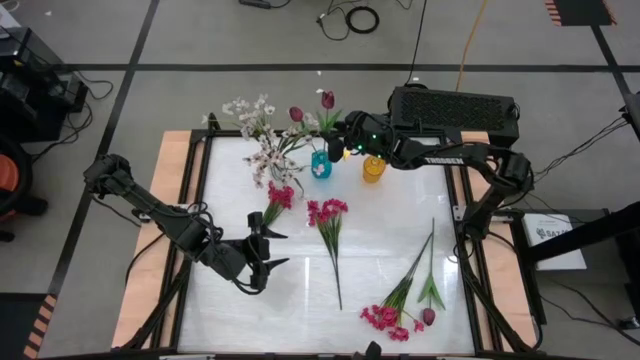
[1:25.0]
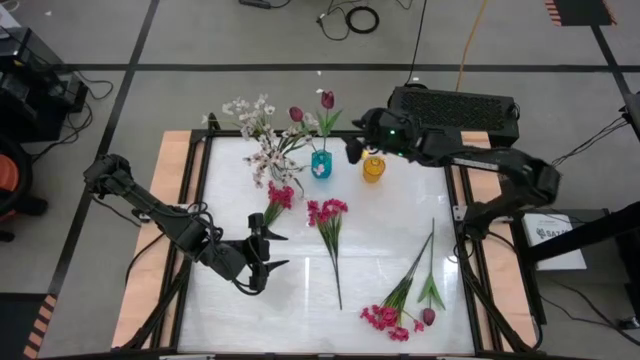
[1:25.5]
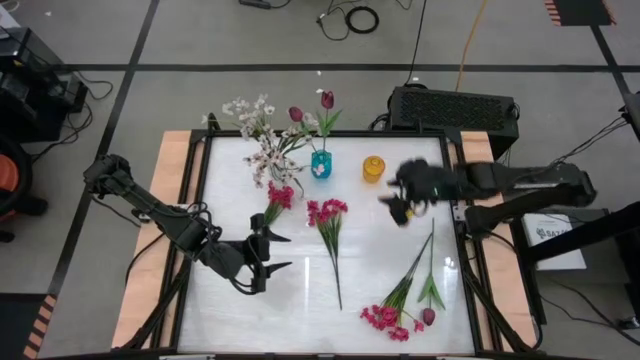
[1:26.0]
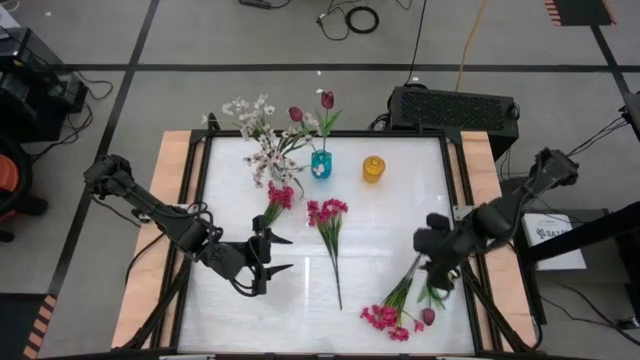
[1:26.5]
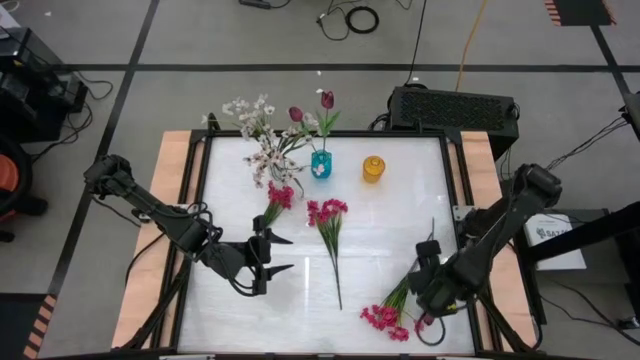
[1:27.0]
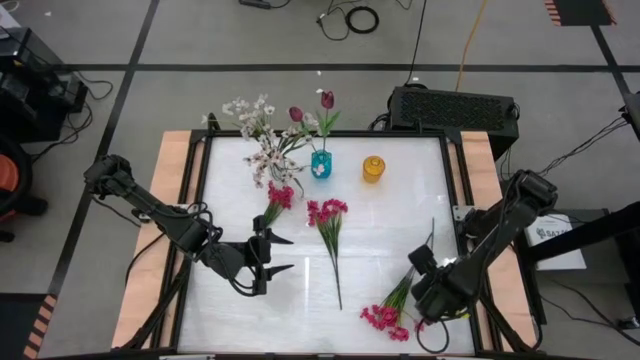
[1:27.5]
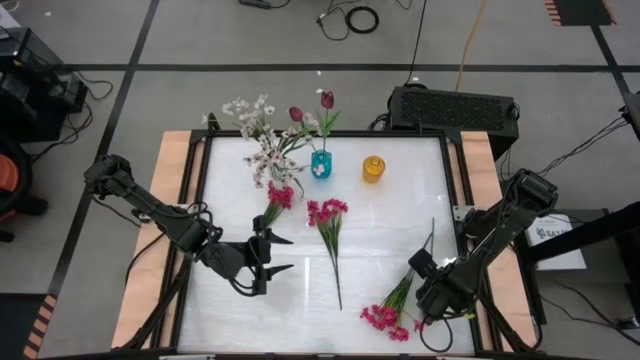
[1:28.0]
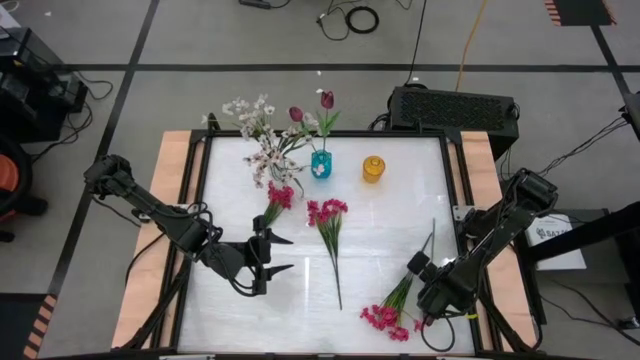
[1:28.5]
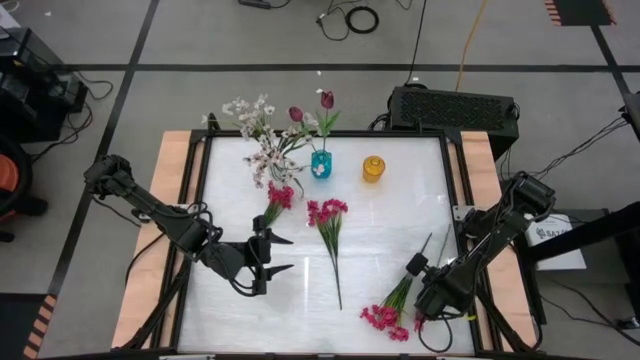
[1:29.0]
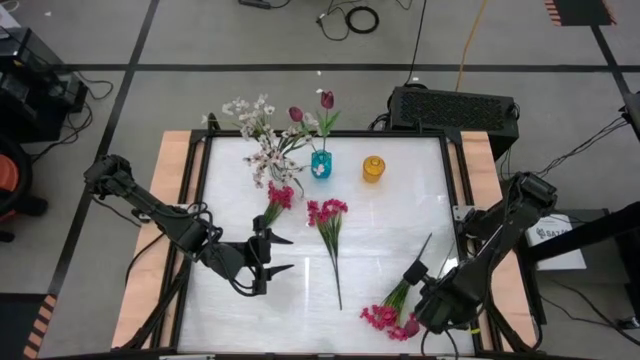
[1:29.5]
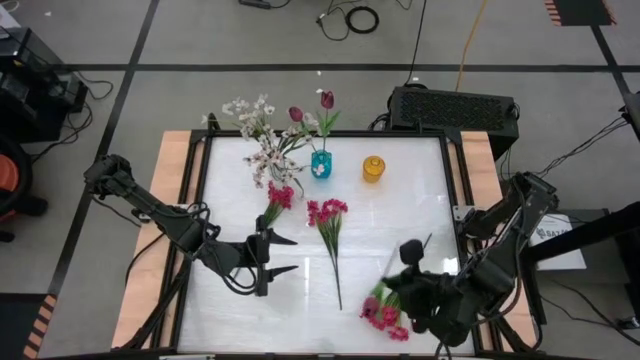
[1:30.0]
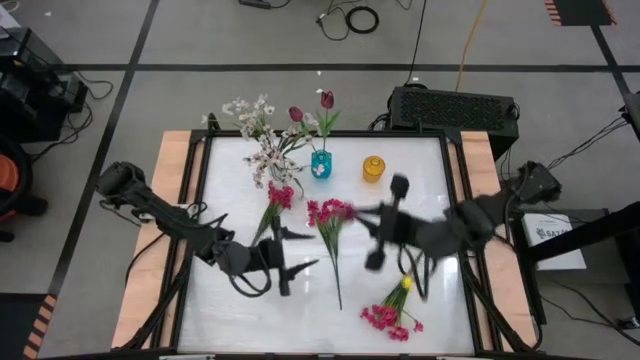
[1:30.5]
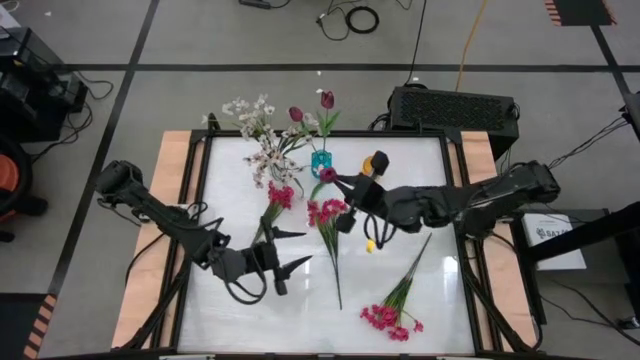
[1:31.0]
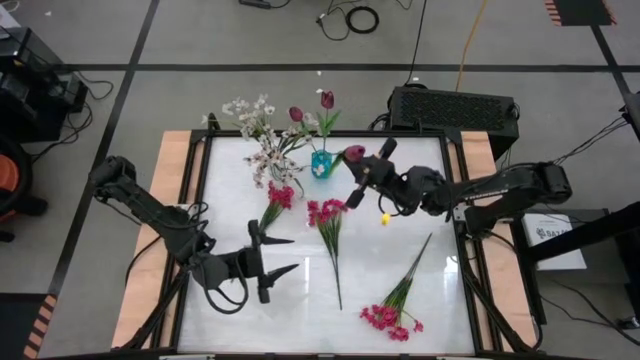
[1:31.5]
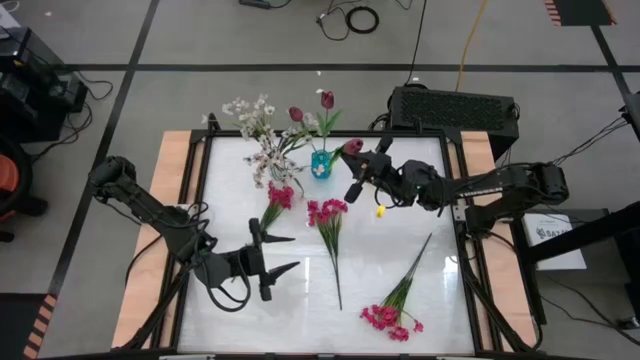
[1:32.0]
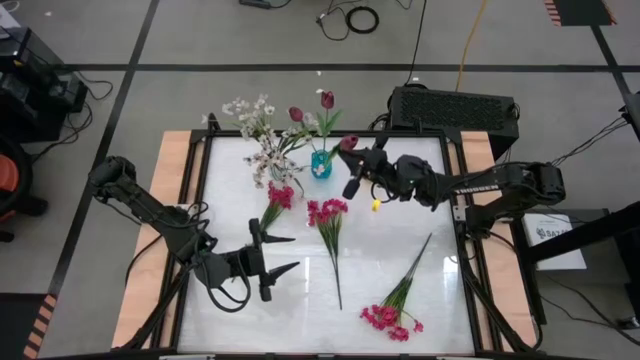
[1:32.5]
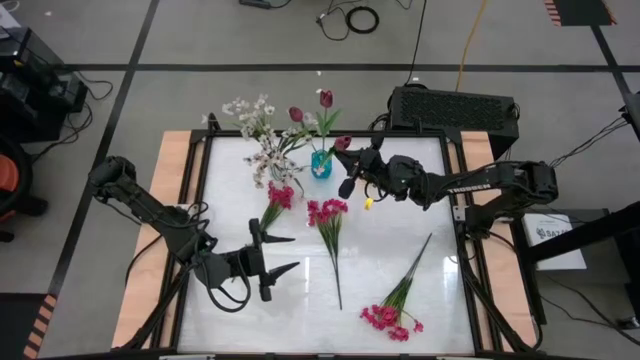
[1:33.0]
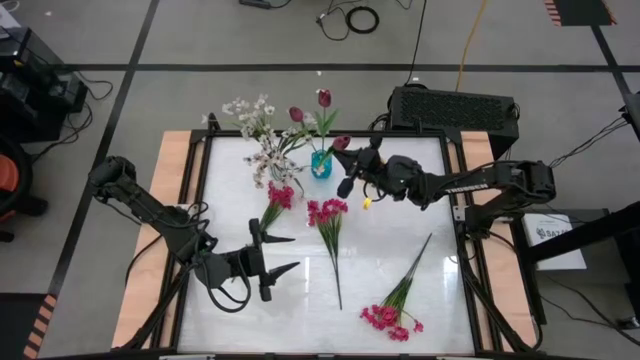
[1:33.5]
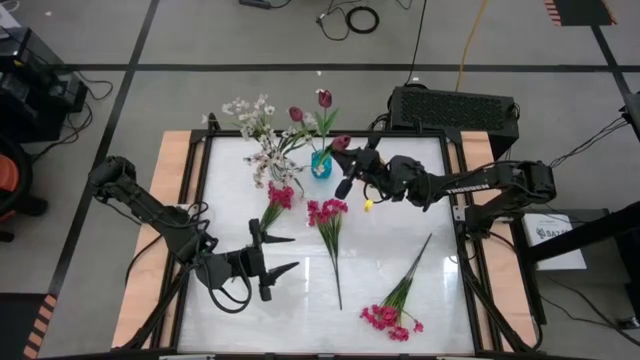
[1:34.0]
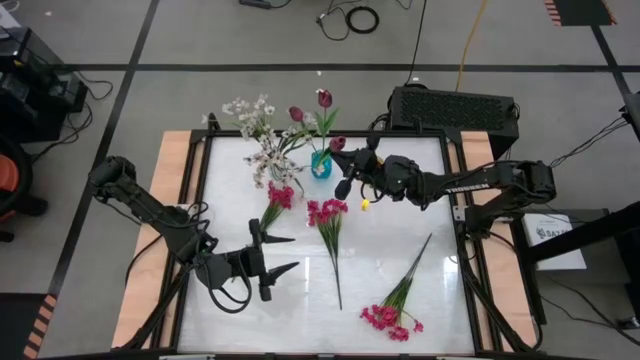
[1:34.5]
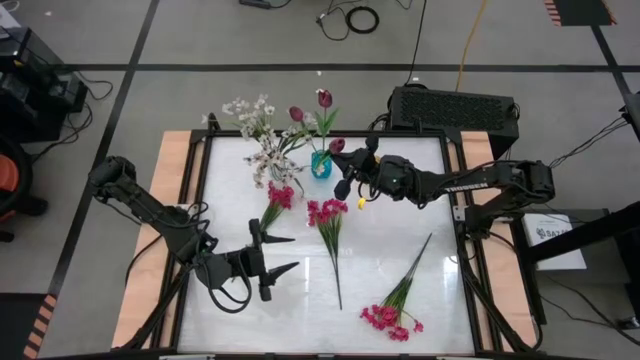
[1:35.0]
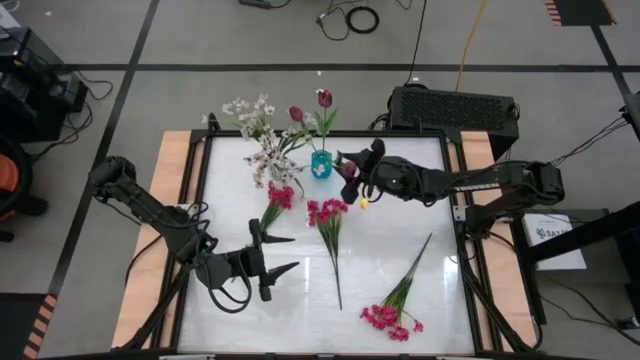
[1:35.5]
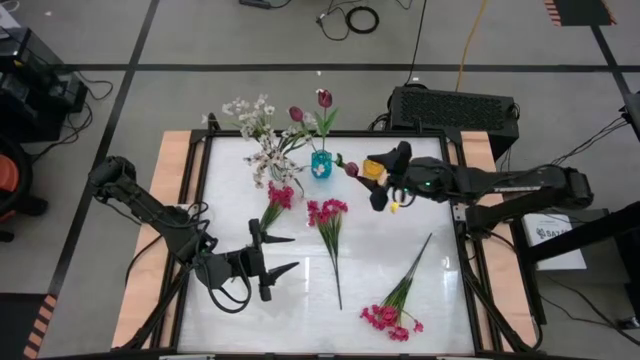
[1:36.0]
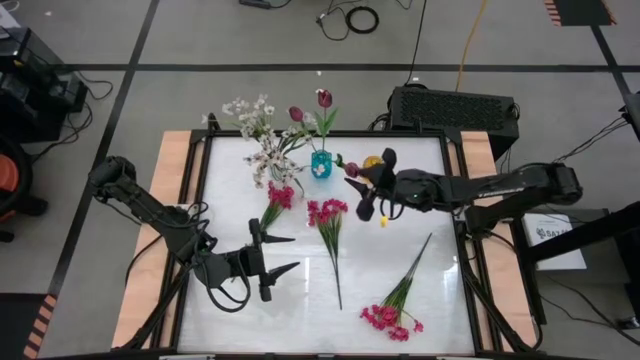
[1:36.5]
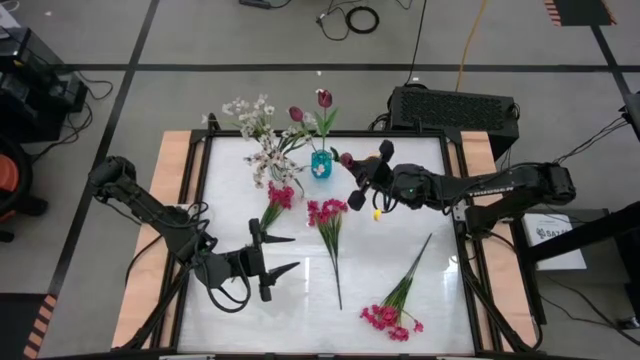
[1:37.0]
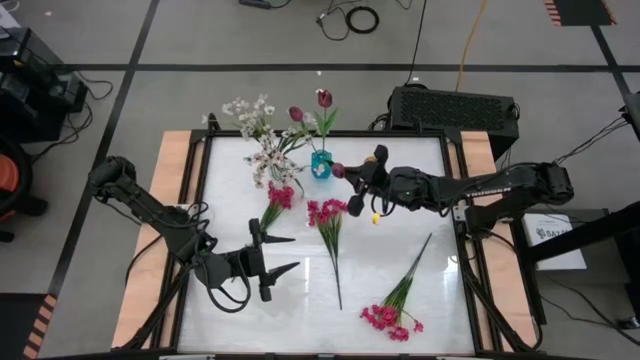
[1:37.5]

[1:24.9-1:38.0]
Task: Sort flowers into vase by color
Put the red tulip into the blue vase

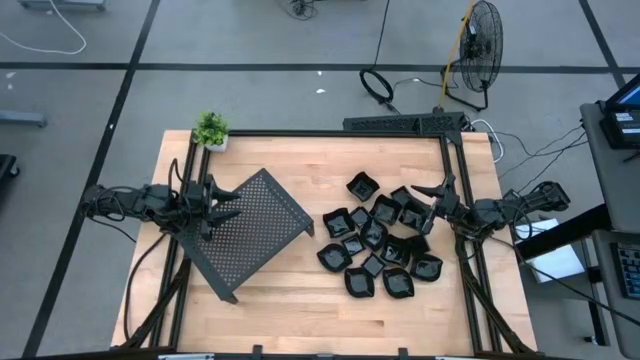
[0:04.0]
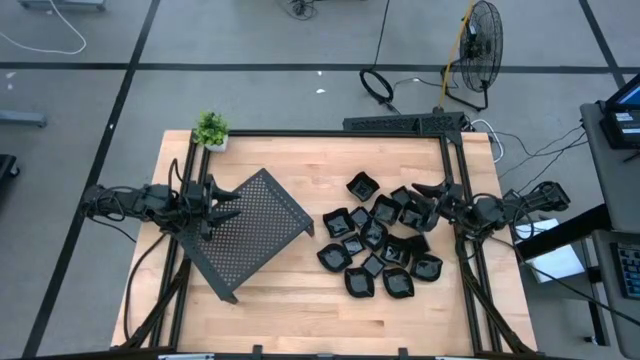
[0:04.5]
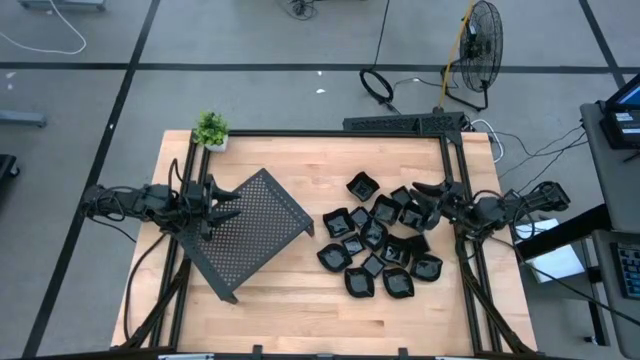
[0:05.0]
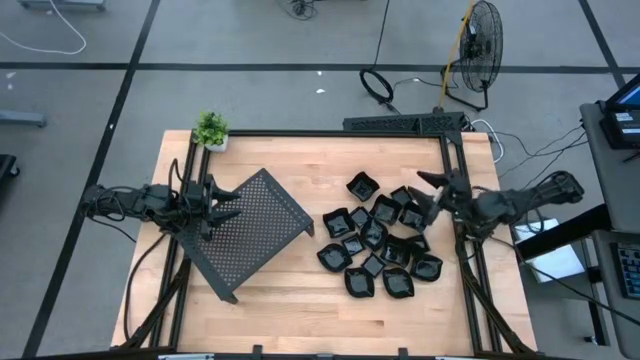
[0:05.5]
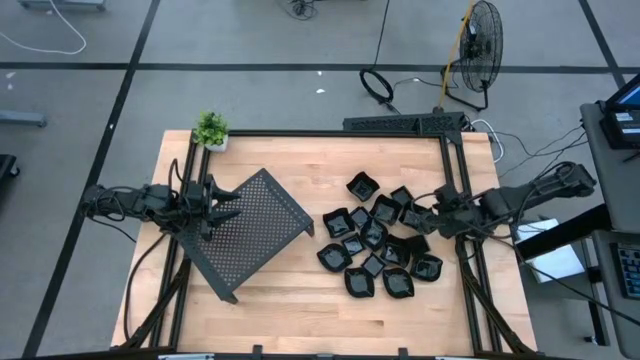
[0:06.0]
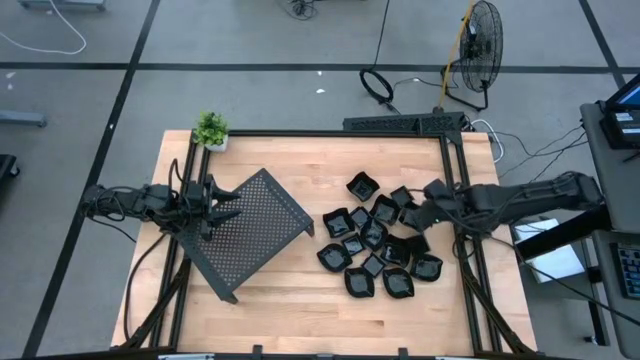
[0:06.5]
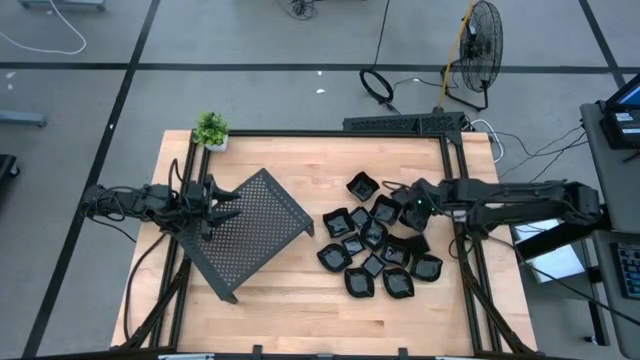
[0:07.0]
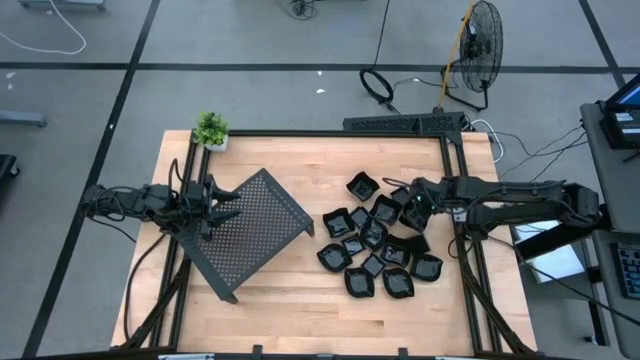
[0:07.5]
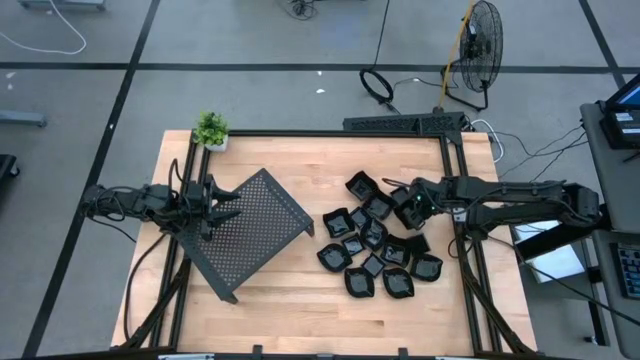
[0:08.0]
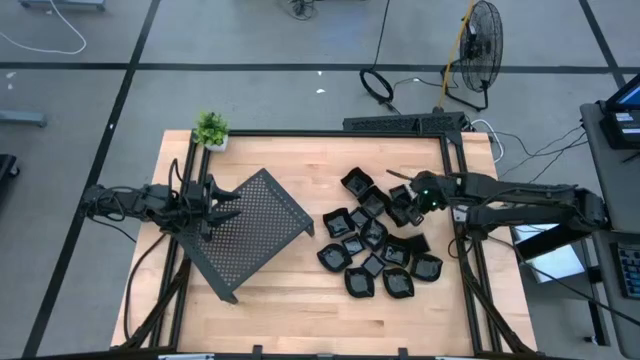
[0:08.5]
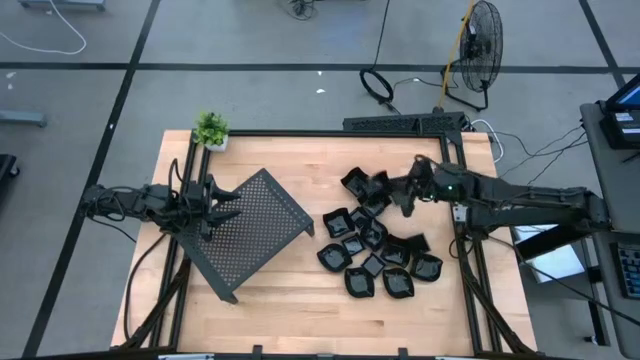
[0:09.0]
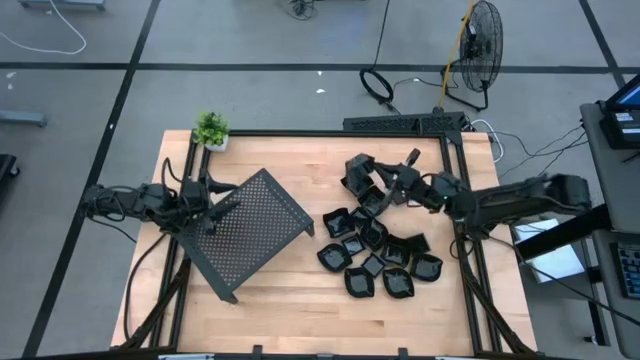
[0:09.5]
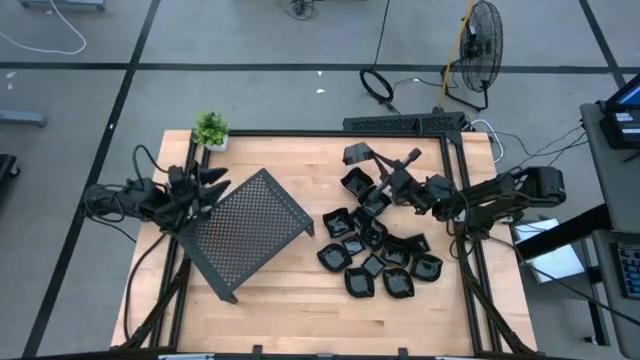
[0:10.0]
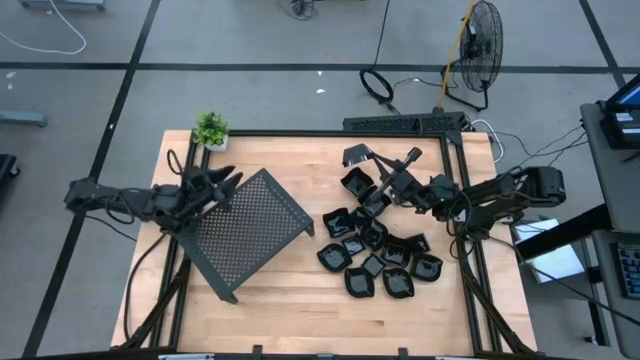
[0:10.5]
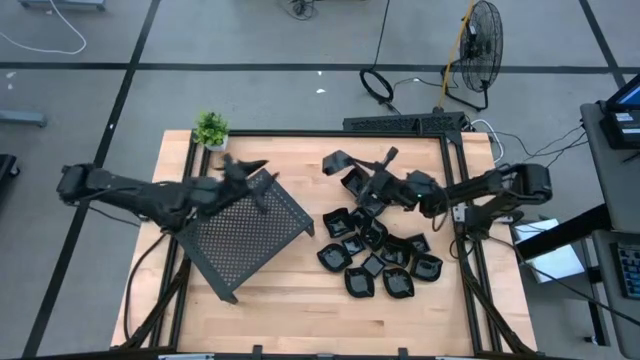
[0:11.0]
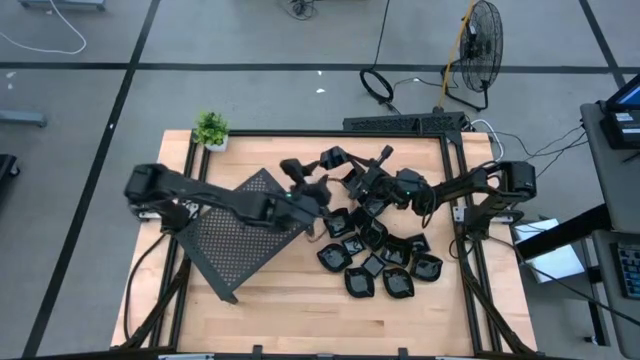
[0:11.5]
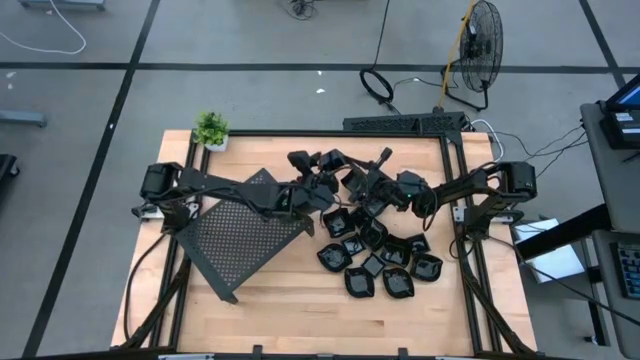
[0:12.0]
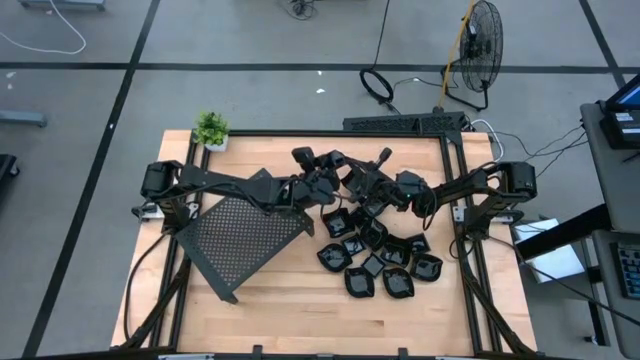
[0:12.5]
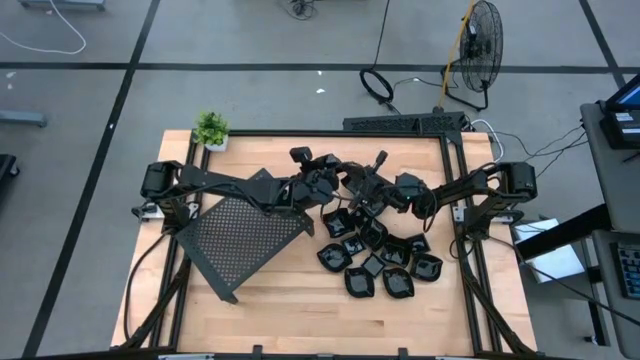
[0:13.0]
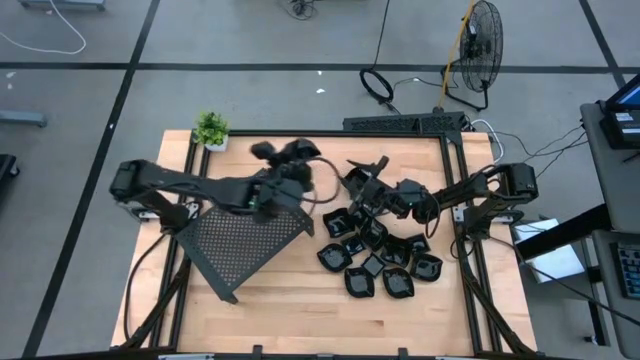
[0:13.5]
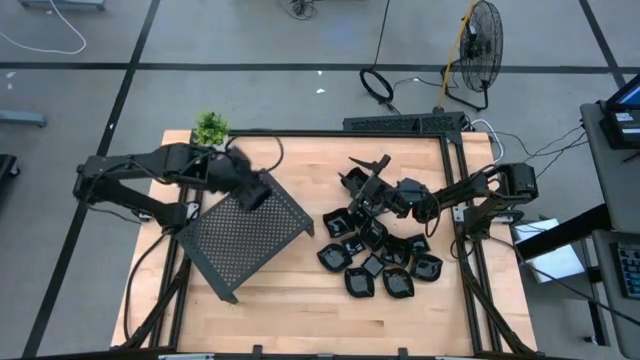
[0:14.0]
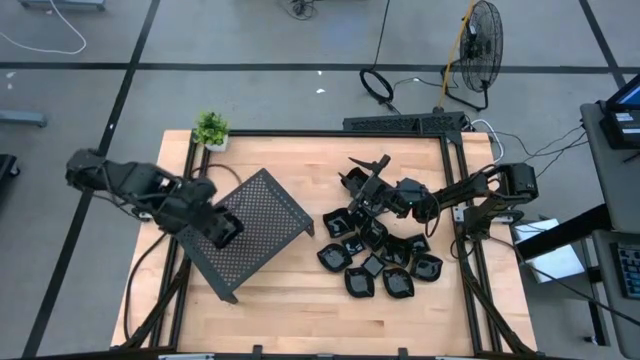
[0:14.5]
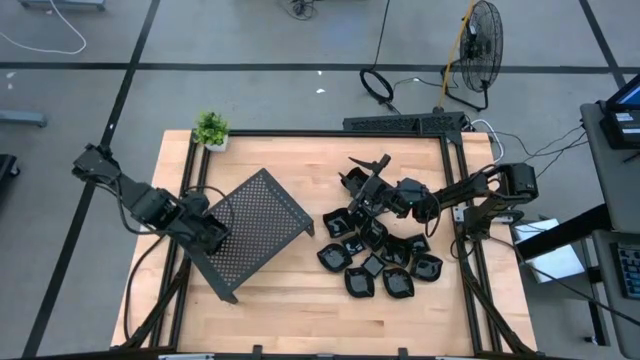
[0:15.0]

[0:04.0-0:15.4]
Task: Pick & Place Mini shaped plates
Put the distorted square plate on the shelf
